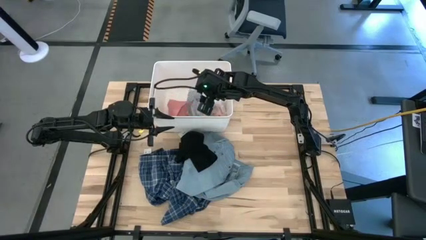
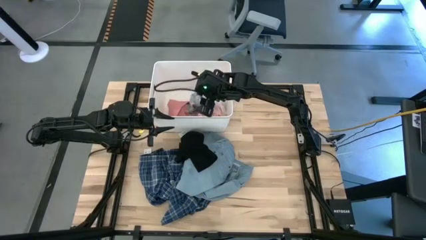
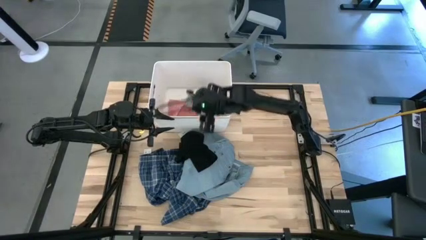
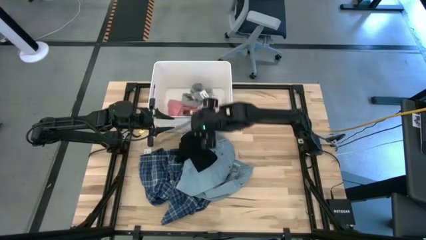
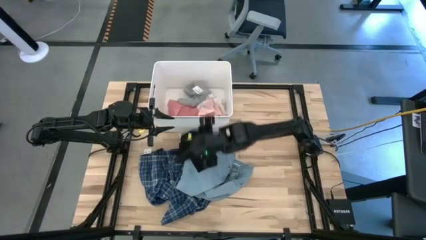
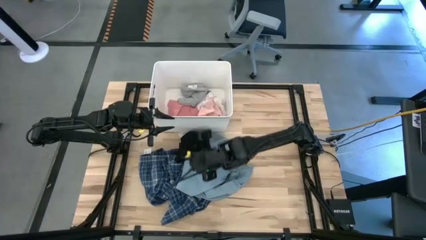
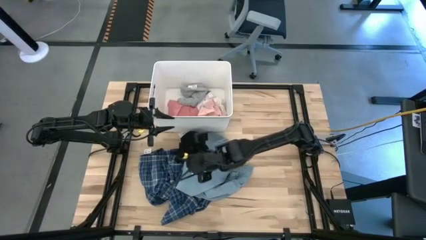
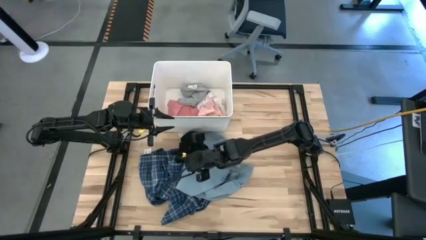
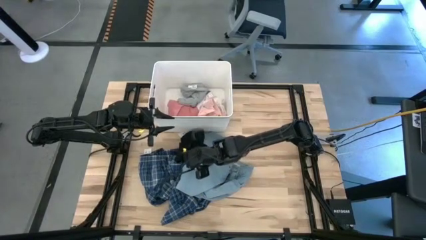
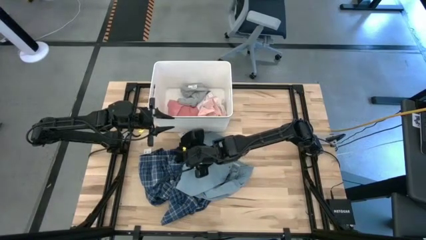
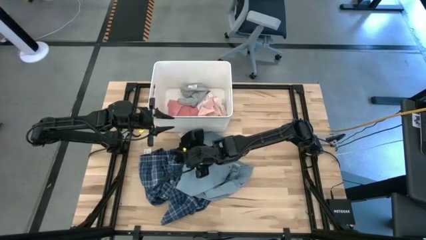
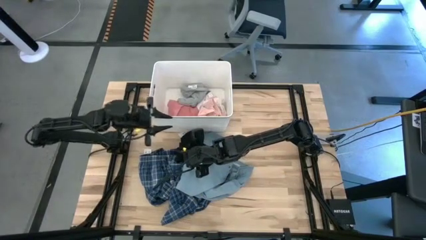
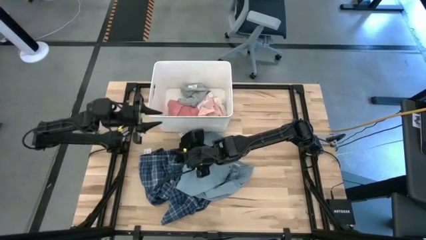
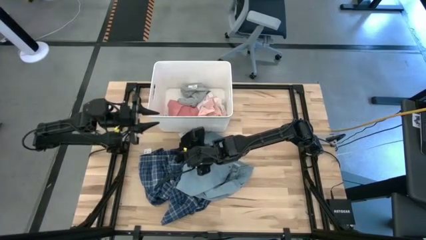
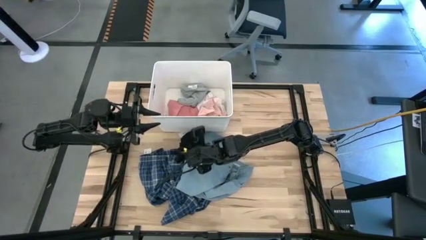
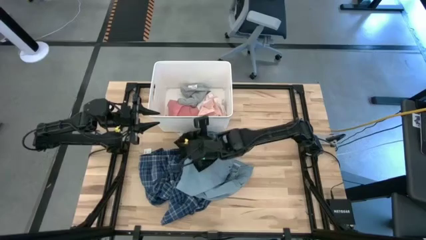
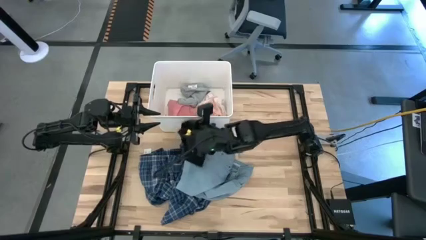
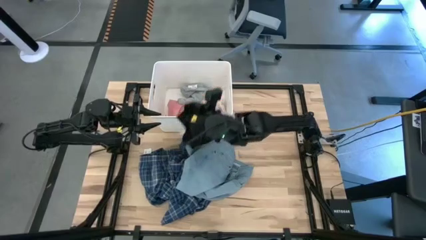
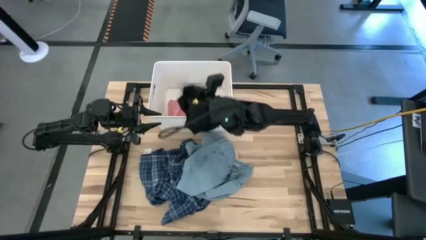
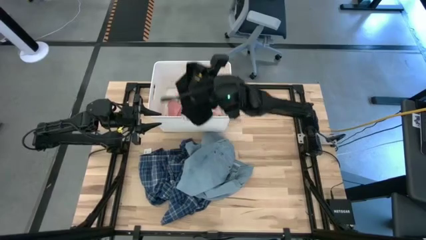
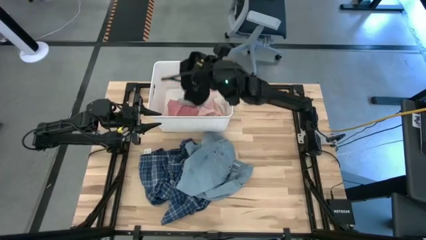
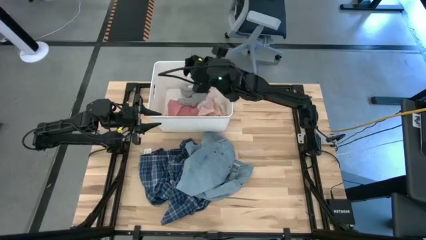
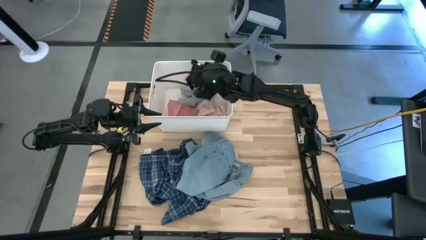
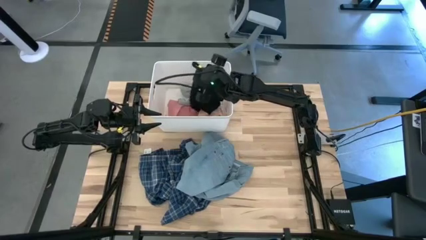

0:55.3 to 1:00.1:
Task: Sort clothes
Put the black underwear into the white bin

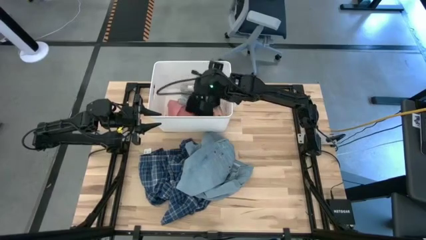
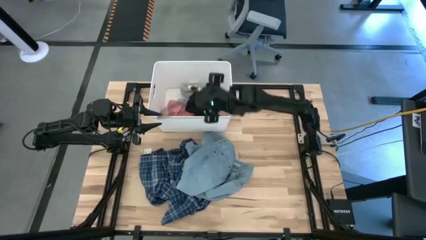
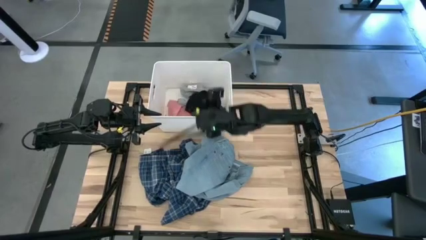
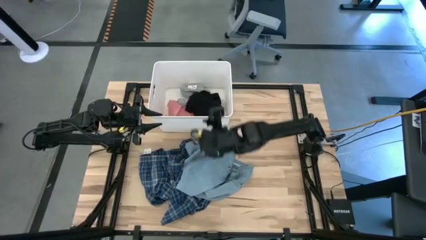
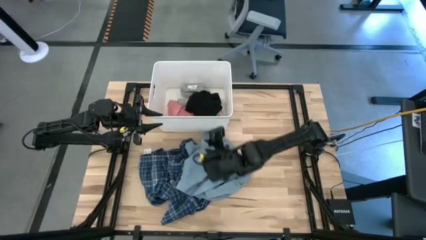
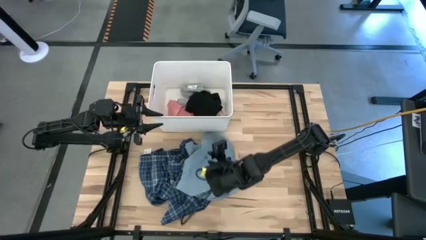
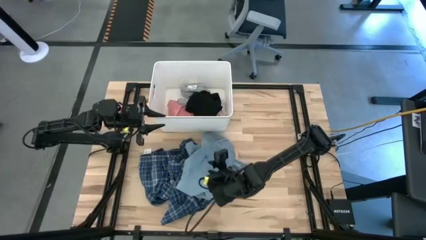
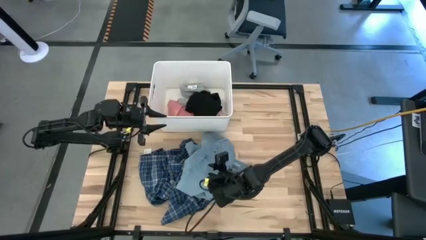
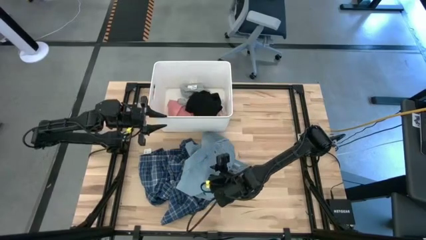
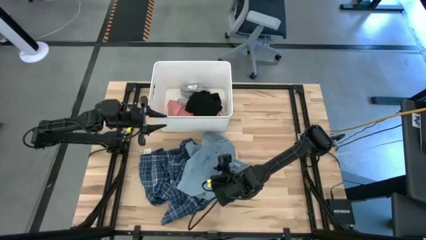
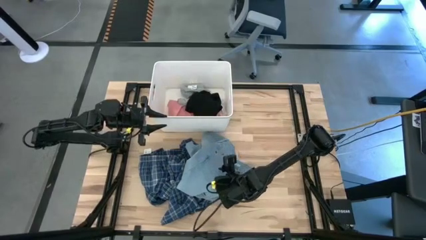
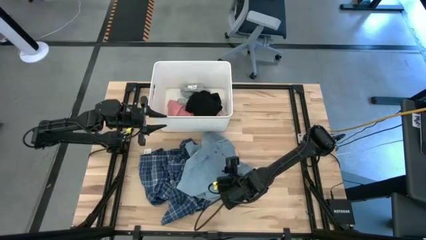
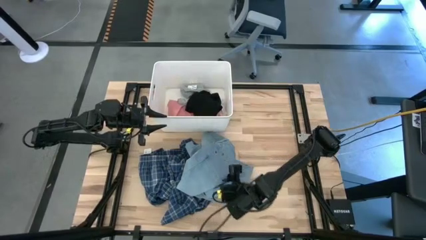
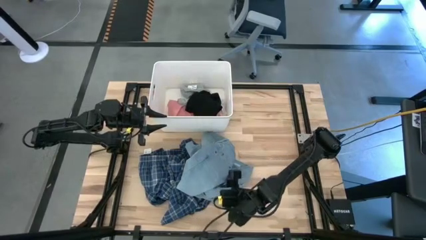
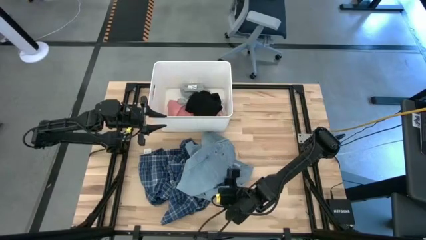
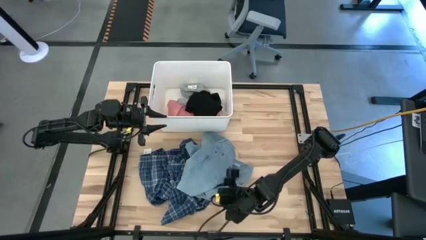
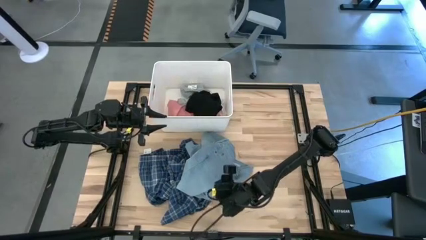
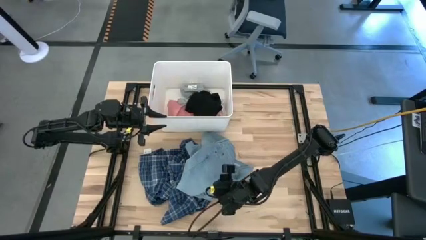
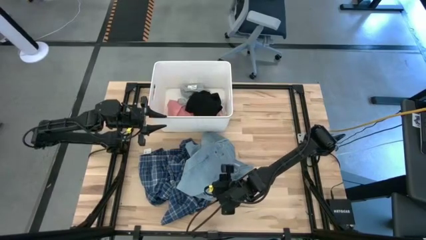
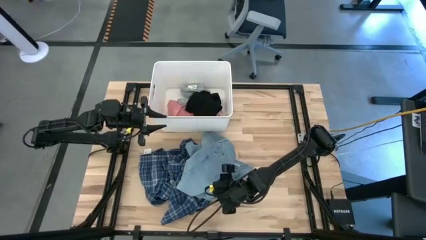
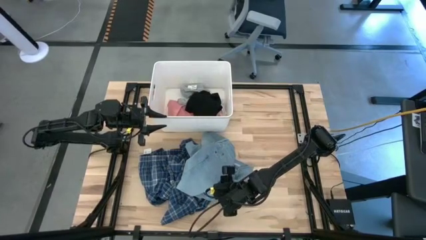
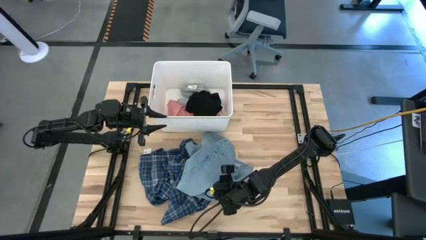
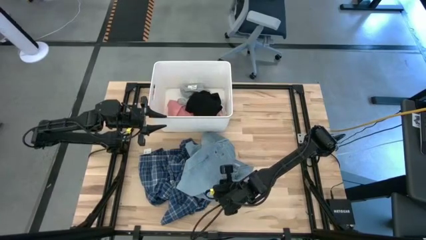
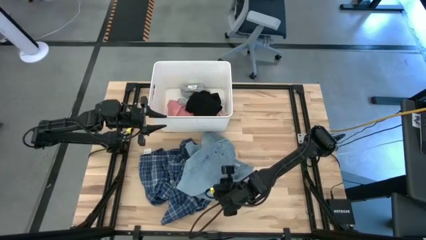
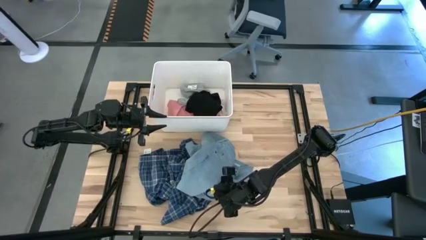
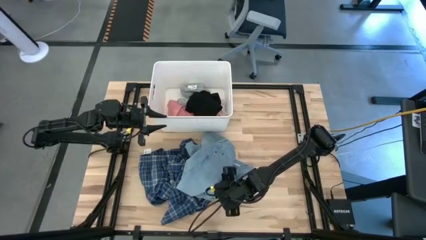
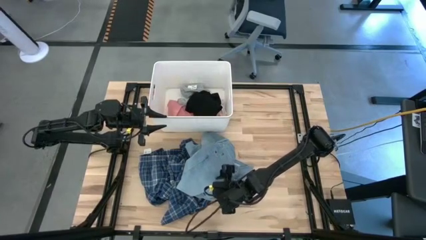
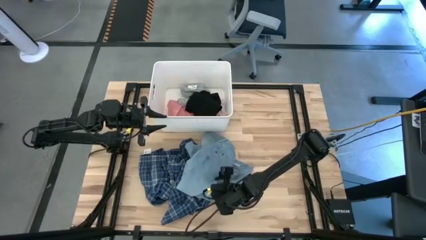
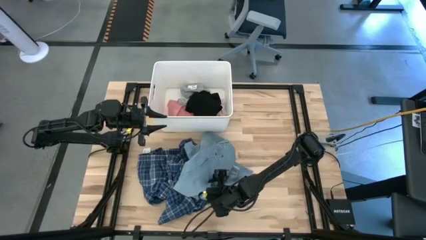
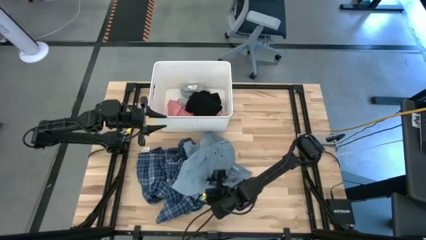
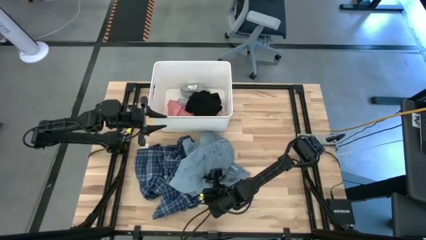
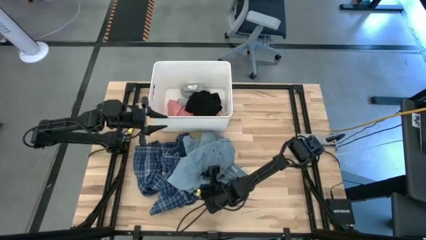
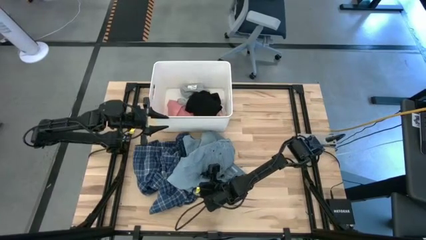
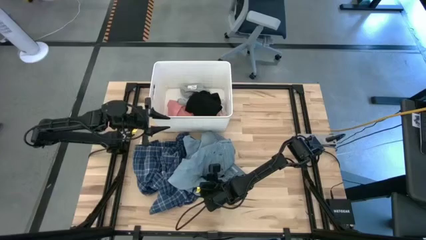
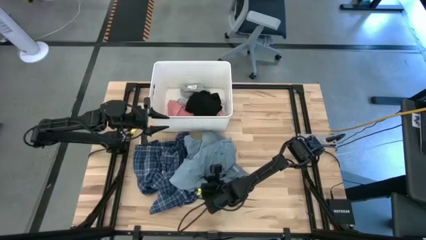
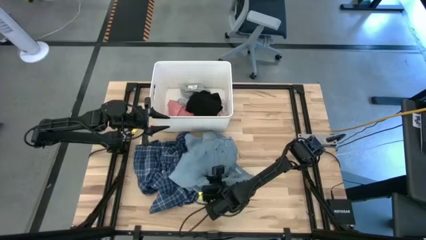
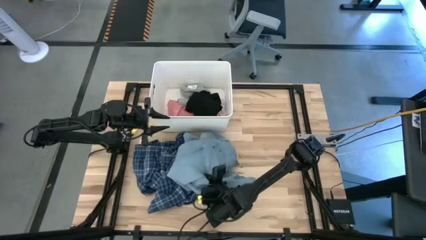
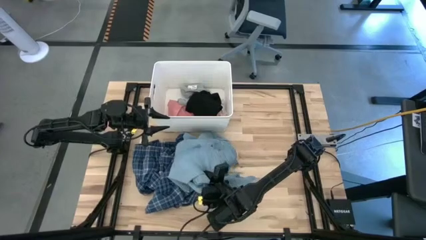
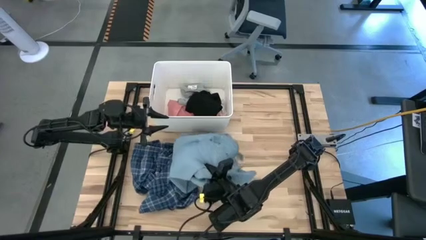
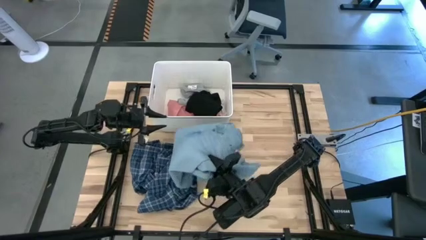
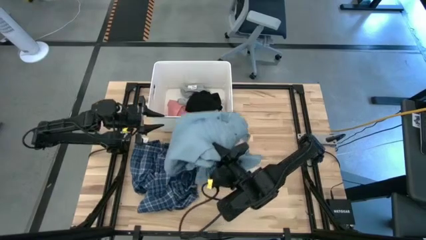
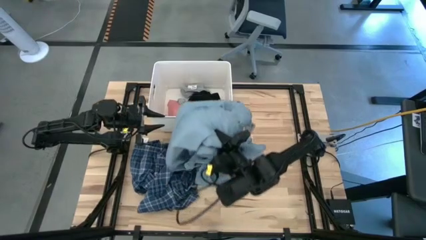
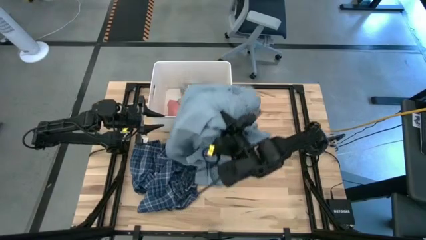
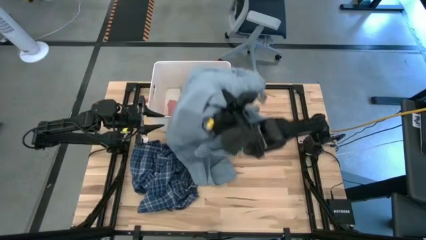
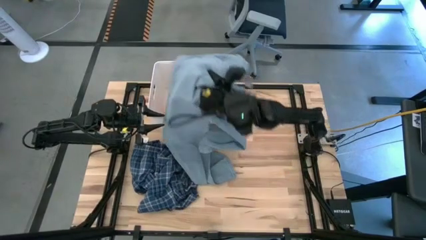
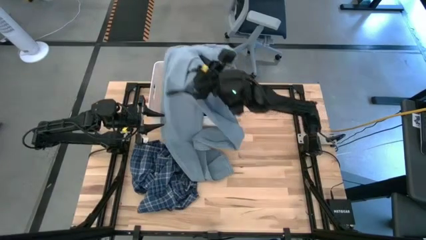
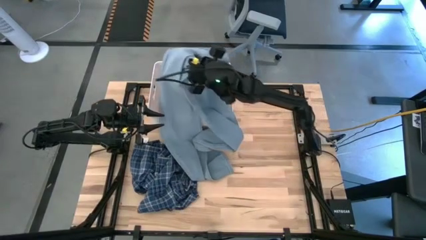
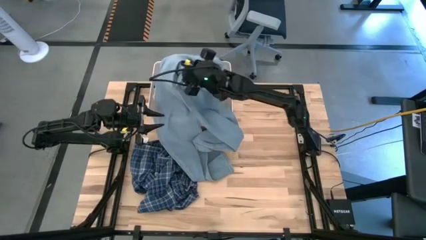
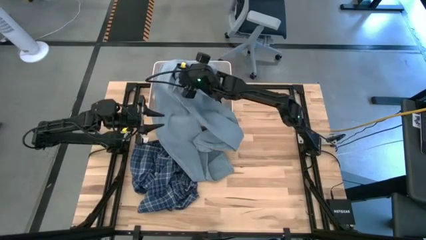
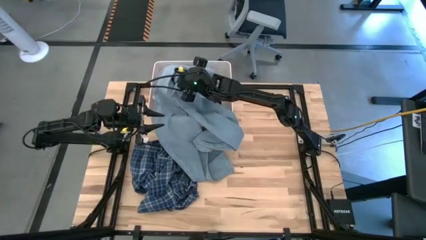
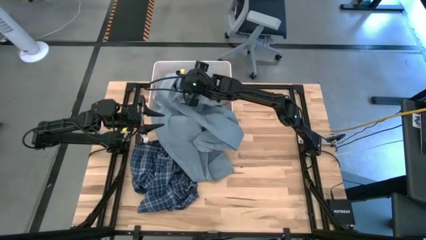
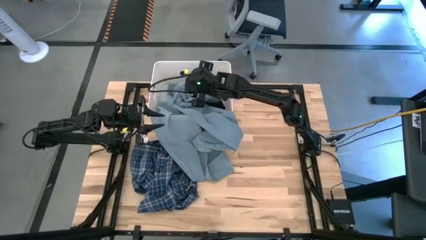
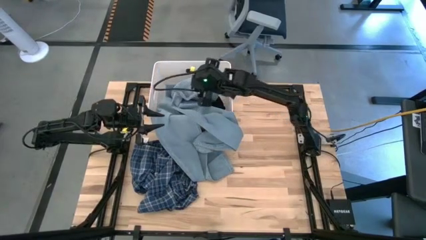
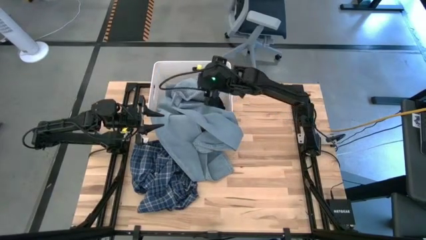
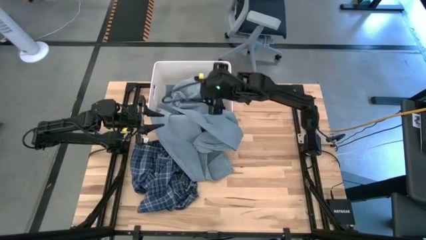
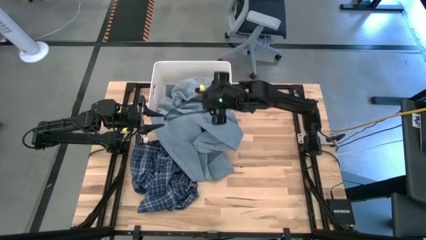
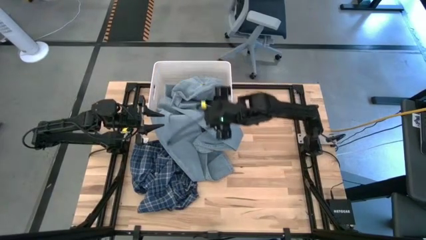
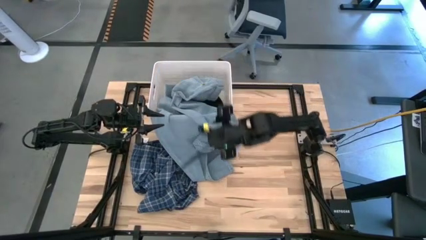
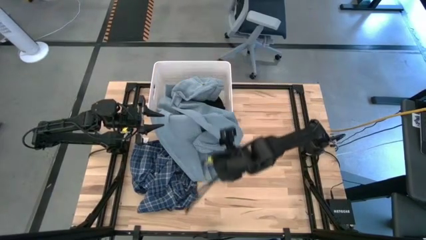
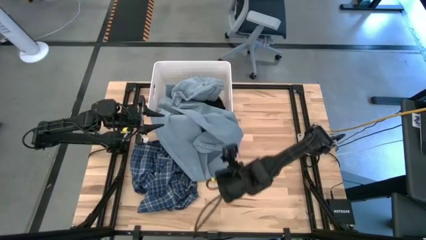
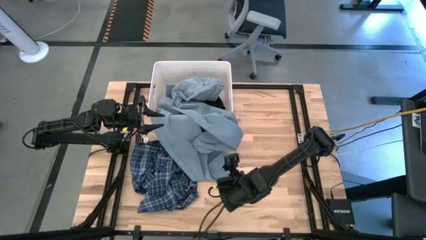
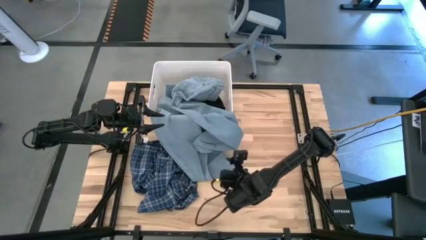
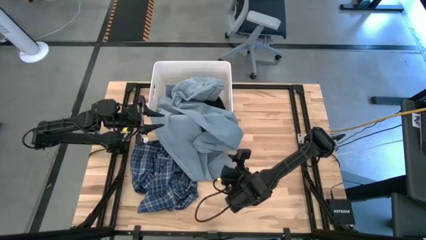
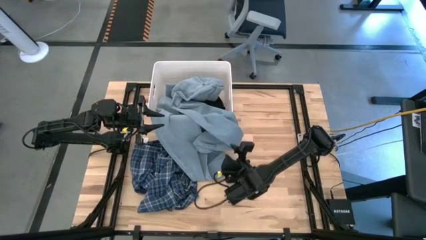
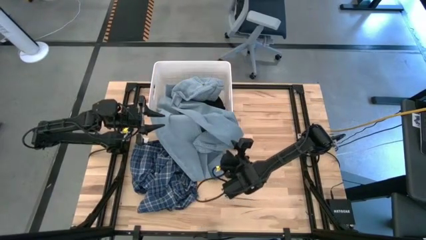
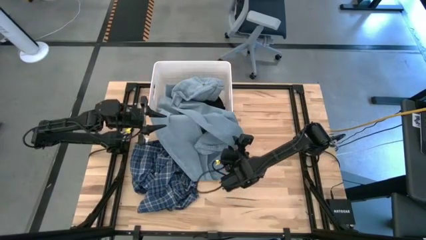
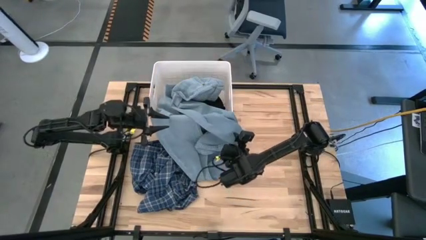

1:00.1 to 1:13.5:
Put the blue pants into the white bin
